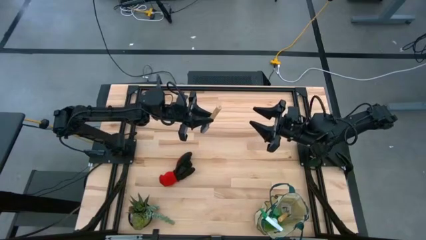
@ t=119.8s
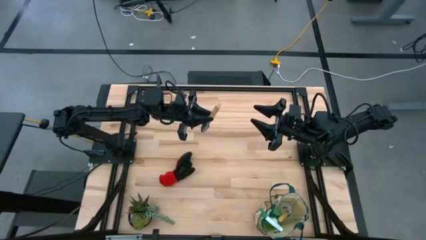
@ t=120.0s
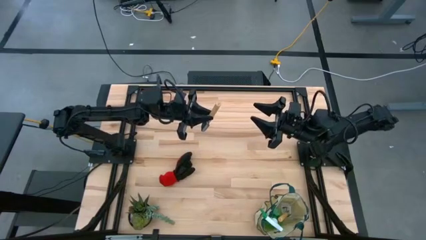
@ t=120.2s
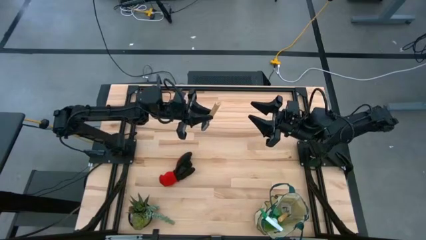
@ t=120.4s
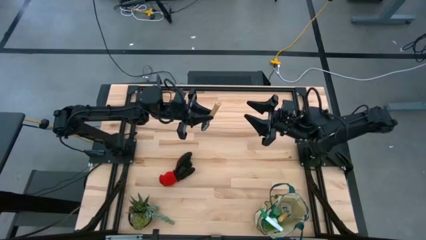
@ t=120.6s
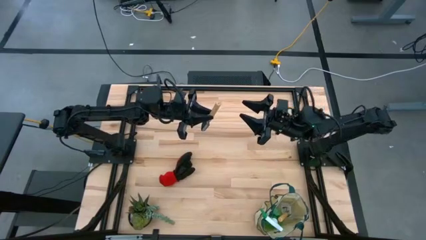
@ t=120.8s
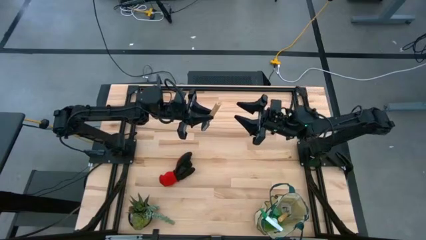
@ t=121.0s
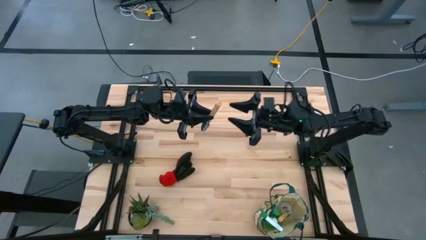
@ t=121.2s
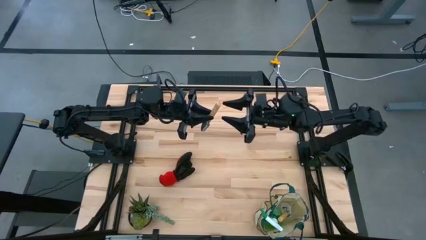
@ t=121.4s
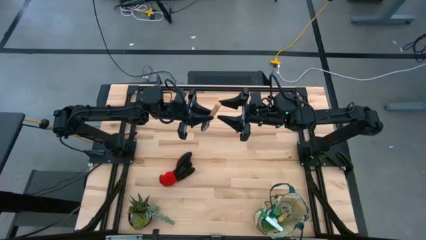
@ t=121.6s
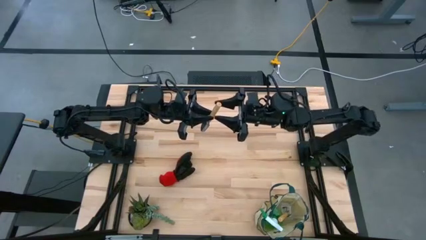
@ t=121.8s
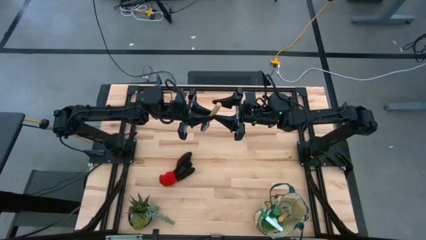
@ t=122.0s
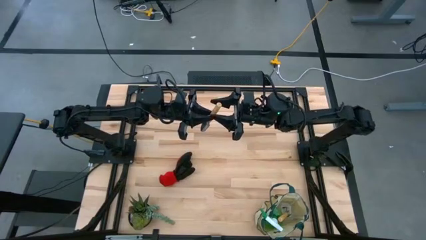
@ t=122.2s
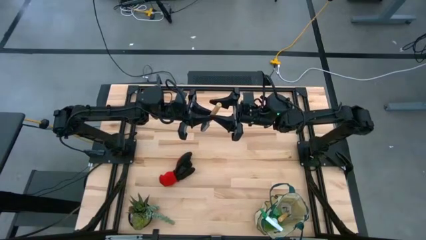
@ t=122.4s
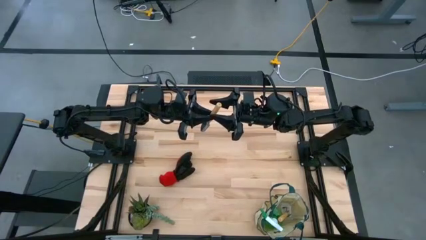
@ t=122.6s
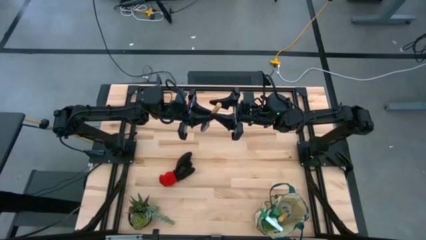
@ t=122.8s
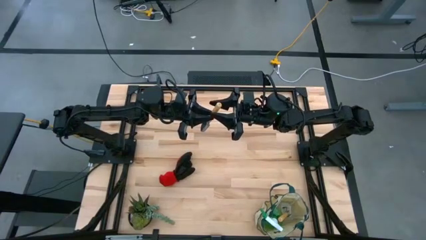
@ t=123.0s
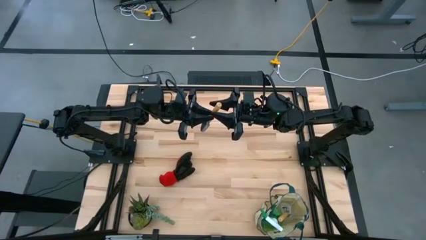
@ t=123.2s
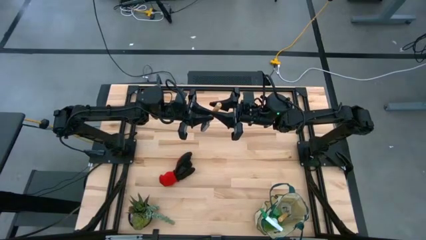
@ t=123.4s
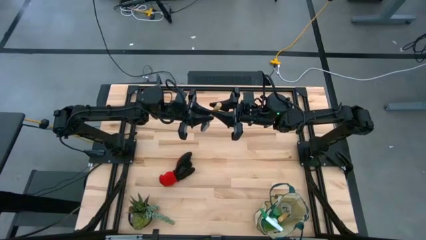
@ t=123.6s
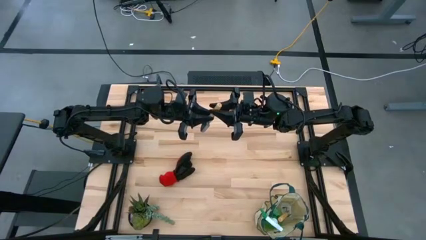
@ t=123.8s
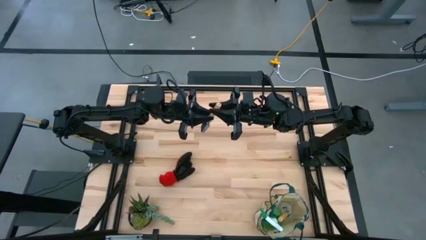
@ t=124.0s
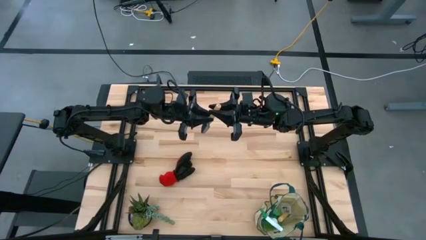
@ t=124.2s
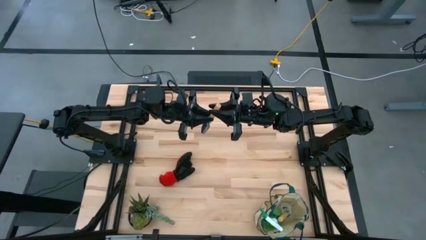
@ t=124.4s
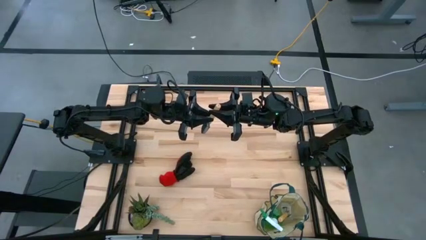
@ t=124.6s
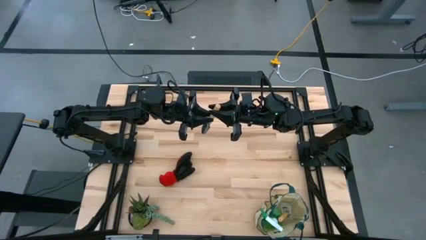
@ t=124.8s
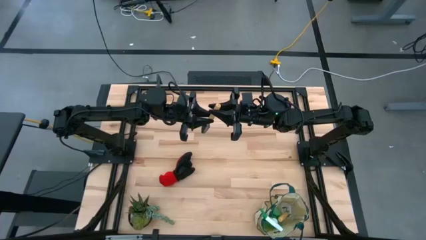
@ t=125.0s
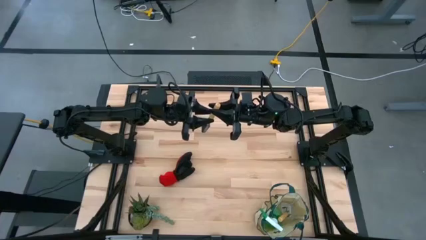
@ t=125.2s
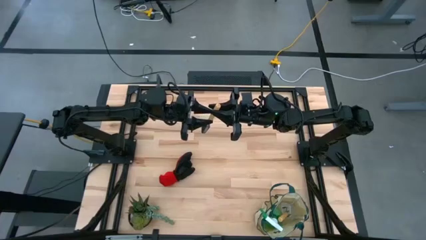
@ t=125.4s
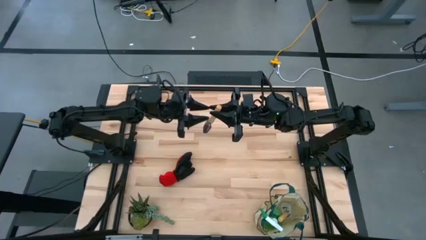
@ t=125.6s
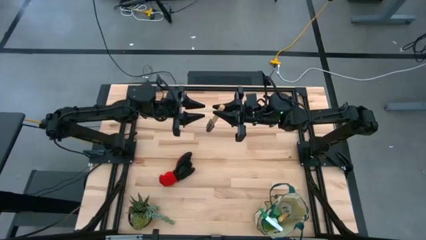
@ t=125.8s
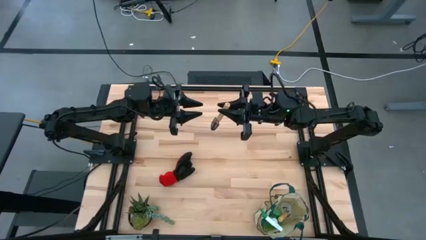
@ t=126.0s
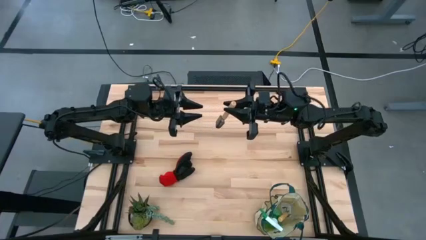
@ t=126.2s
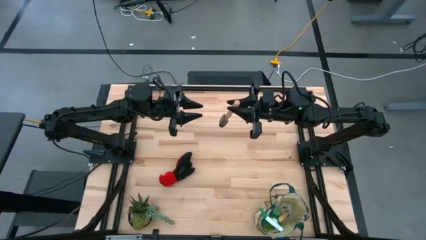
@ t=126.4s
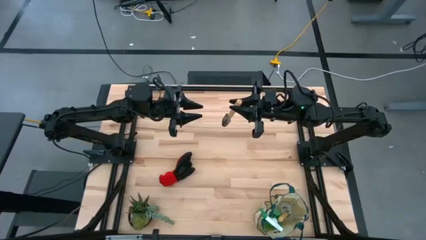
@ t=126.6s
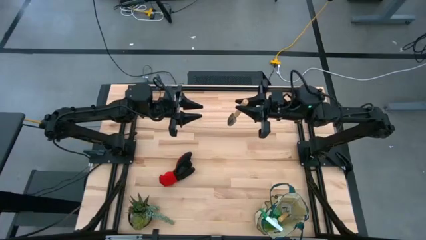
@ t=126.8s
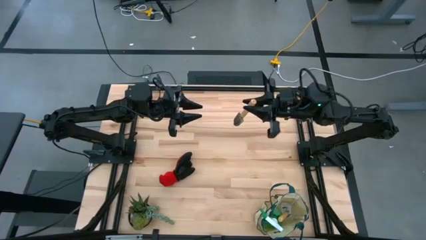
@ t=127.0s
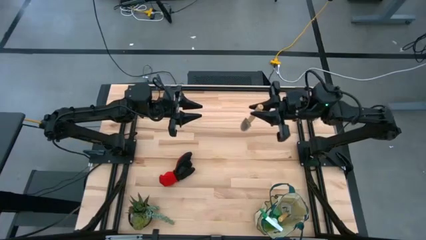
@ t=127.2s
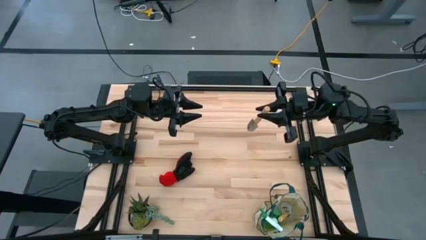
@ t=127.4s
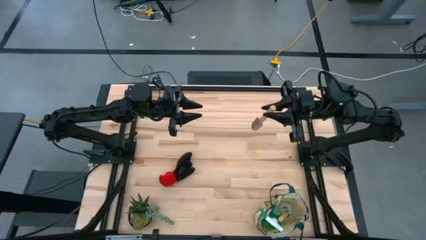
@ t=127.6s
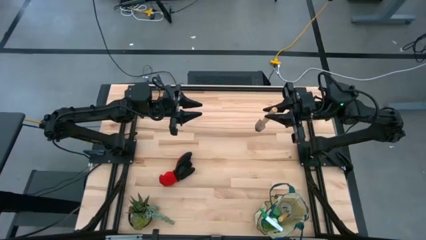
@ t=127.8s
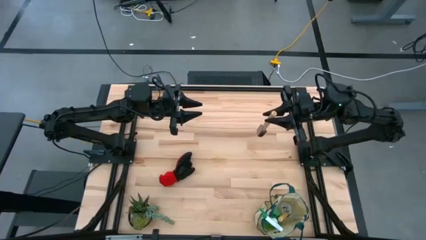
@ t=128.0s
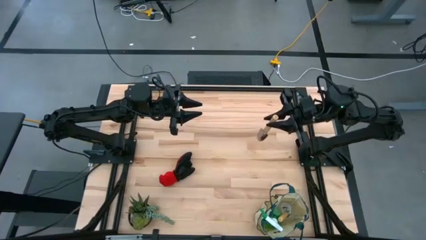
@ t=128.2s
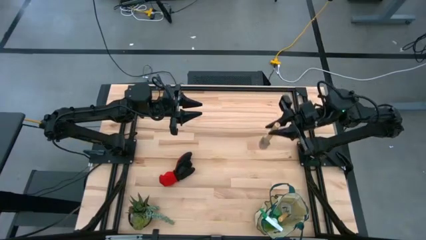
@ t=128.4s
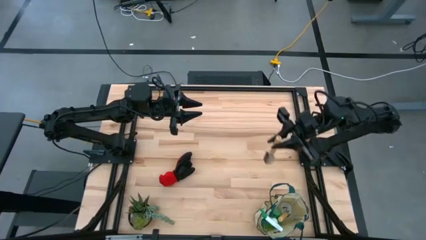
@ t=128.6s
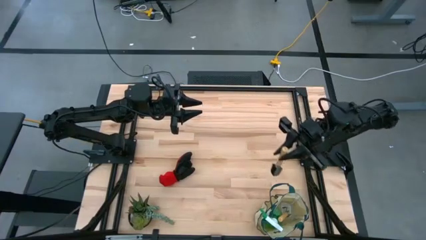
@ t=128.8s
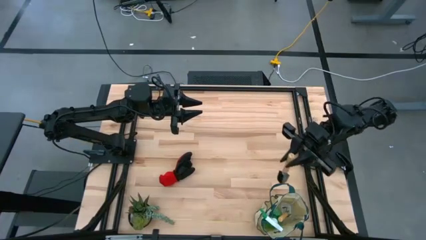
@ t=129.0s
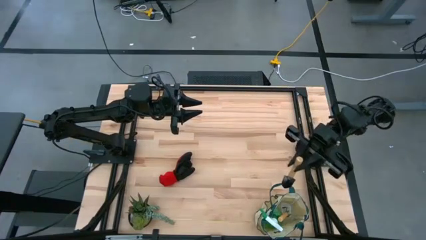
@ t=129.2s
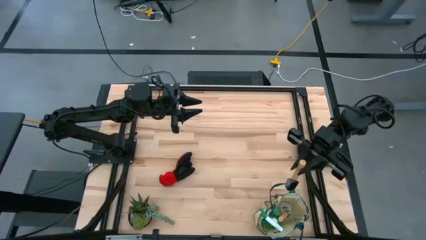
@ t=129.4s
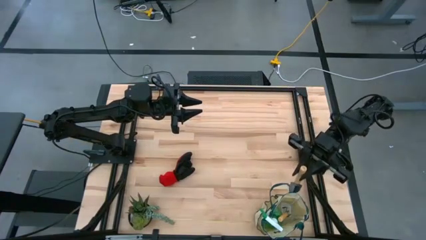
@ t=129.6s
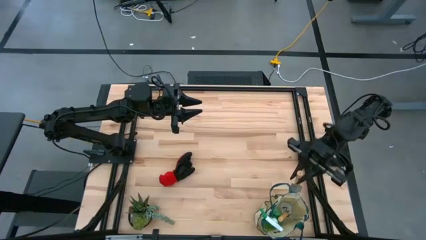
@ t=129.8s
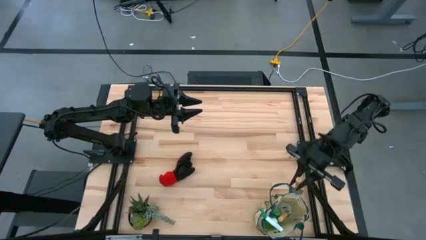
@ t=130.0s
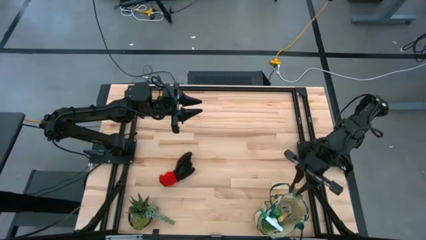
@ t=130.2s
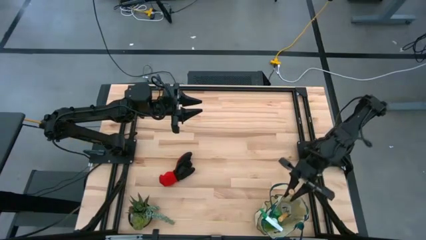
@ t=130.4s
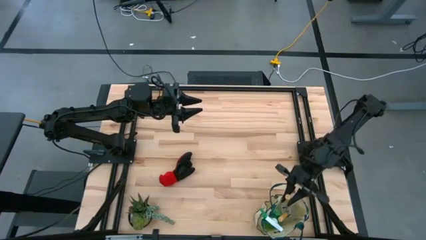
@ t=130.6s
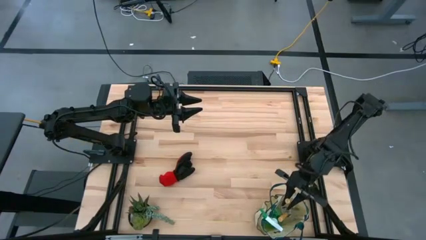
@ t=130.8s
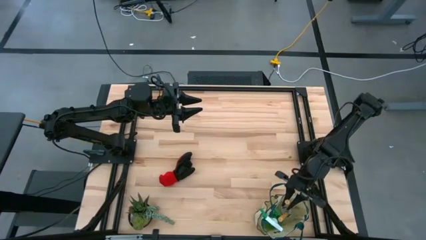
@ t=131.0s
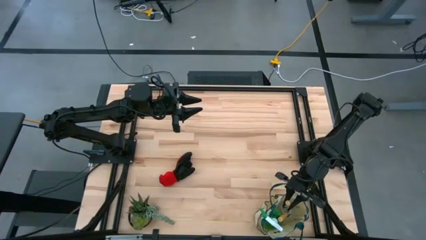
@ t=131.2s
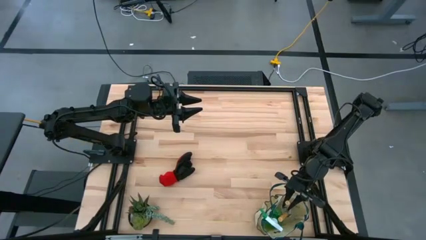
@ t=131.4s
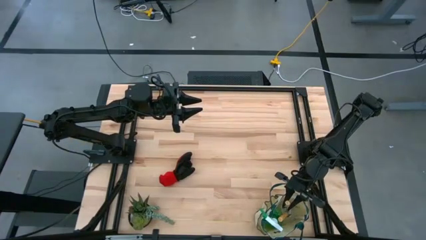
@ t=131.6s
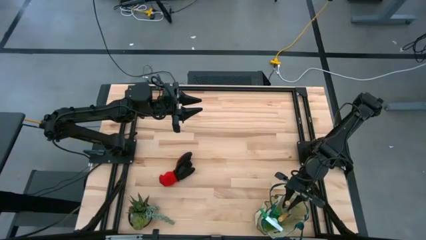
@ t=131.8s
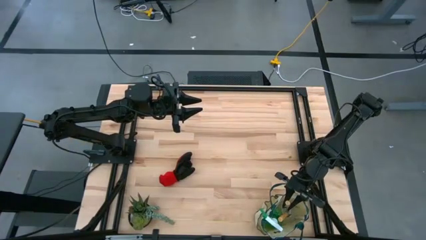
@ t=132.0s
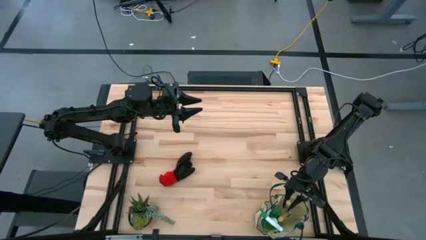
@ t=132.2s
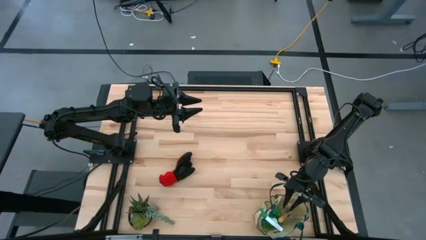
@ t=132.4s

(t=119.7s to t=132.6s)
Task: Pick & Place Garden tools in Gardening bag
Put the brown hand trowel into the gardening bag

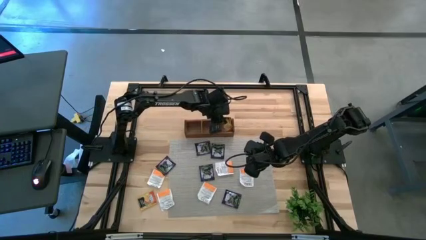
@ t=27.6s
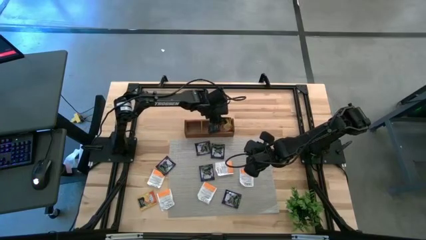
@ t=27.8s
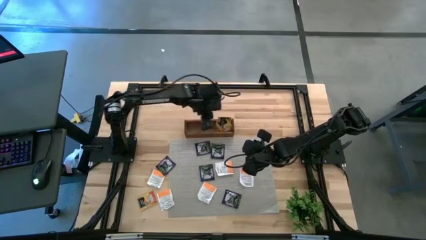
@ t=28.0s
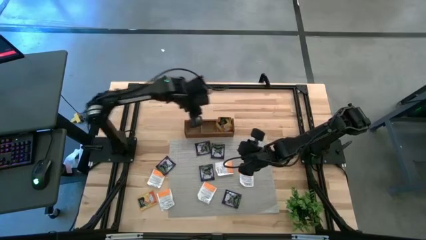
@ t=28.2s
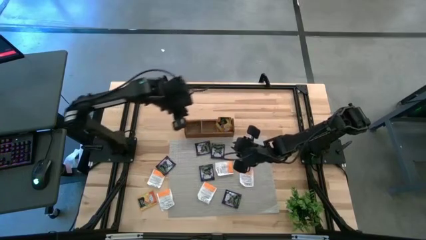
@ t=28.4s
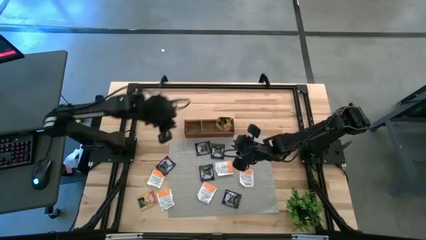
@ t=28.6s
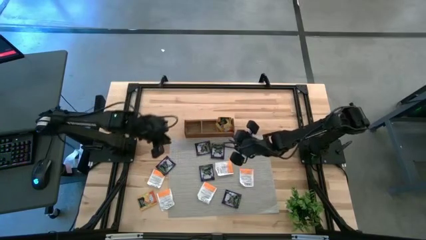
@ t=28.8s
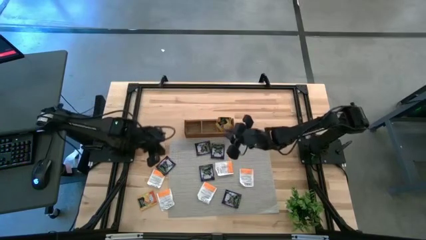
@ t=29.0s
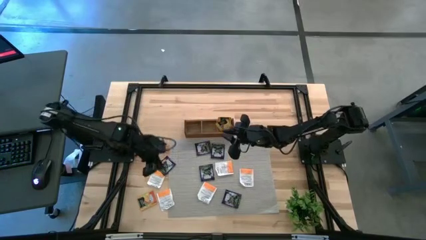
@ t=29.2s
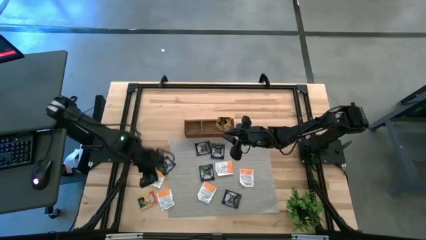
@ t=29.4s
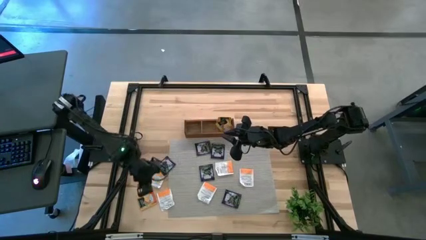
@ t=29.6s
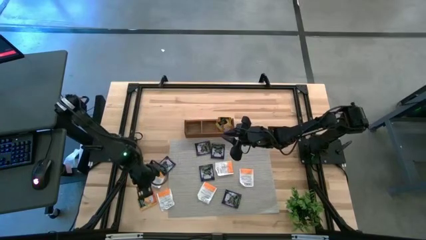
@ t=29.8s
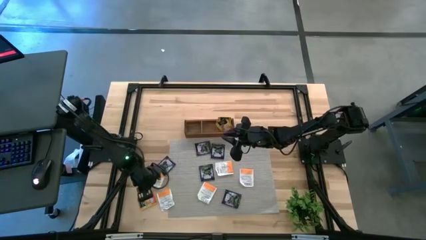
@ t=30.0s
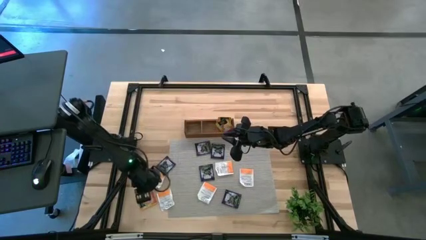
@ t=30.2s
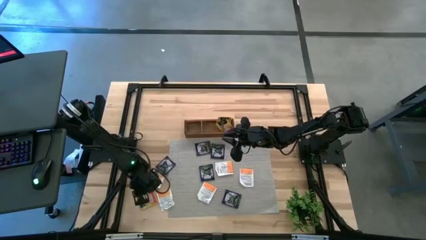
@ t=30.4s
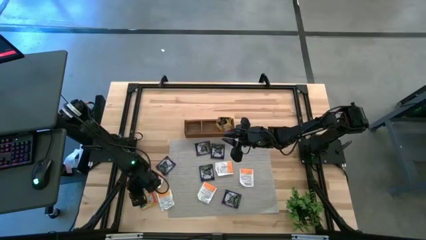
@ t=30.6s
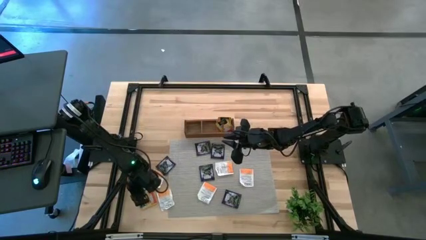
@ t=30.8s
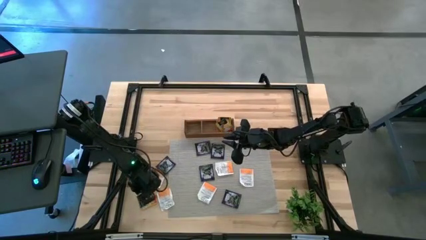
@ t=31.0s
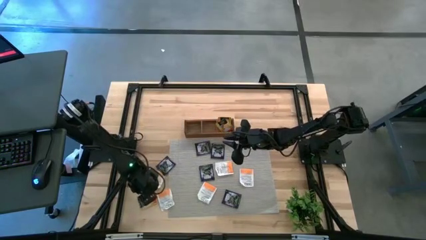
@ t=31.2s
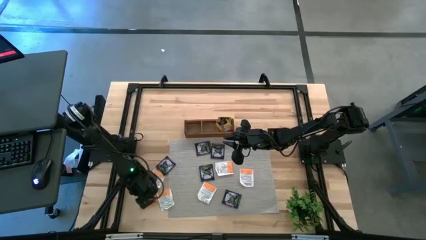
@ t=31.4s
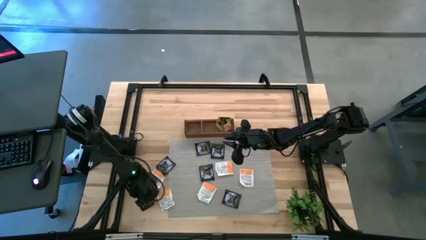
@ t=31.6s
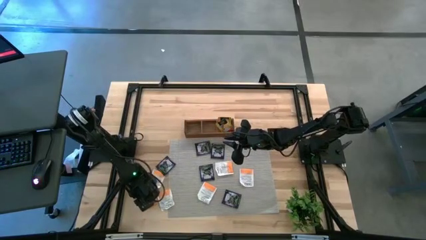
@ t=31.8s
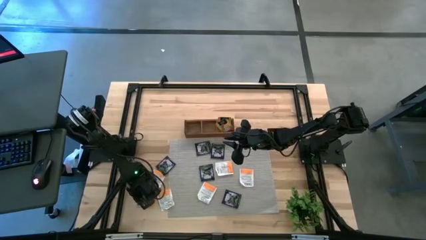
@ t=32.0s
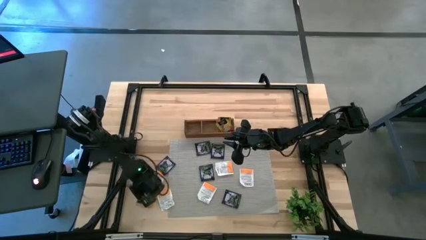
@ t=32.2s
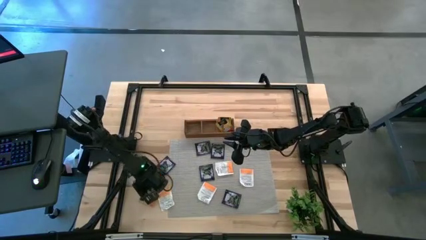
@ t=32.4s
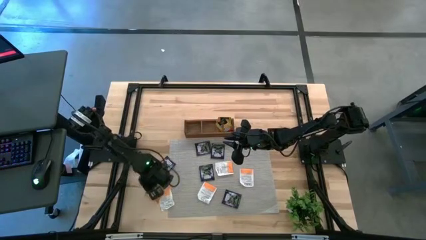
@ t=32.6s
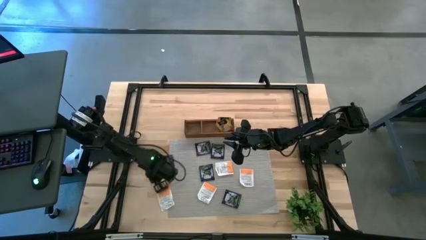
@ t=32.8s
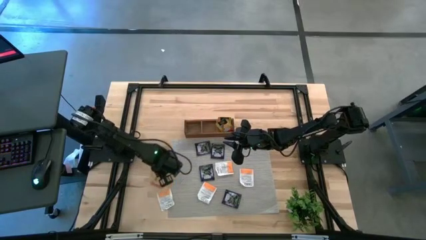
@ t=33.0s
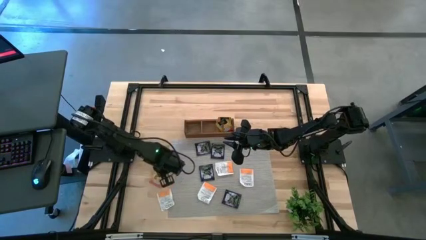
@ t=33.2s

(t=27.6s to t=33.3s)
Task: Pick & Place Tea
Put the orange tea bag into the right section of the wooden organizer
